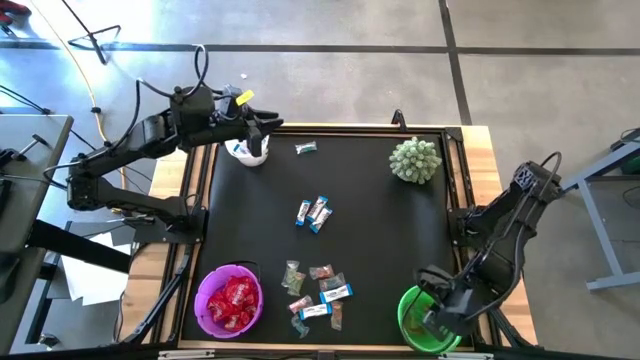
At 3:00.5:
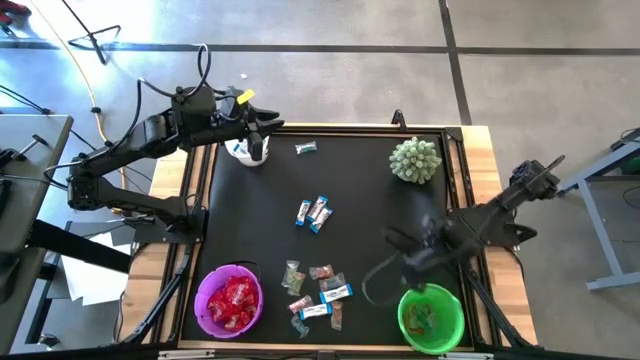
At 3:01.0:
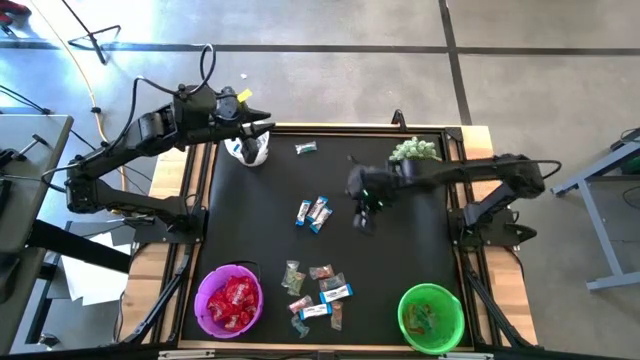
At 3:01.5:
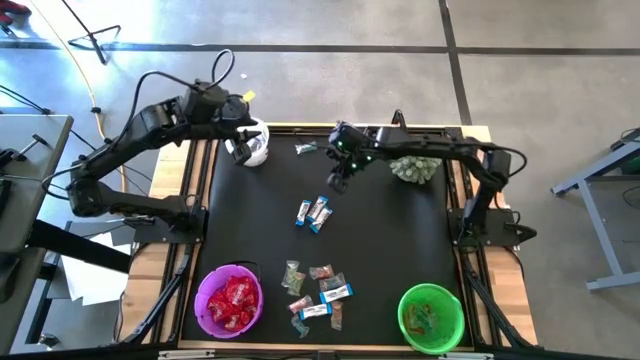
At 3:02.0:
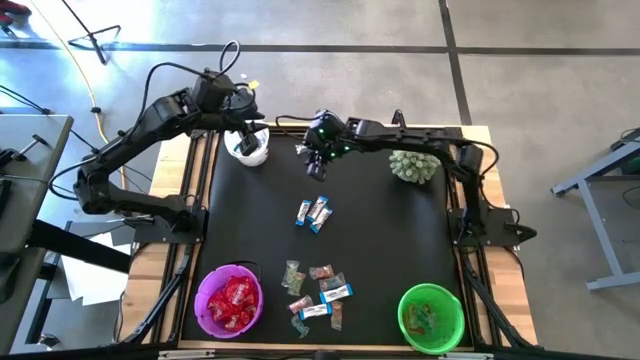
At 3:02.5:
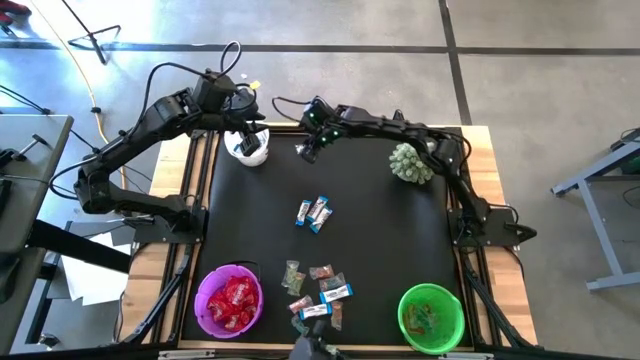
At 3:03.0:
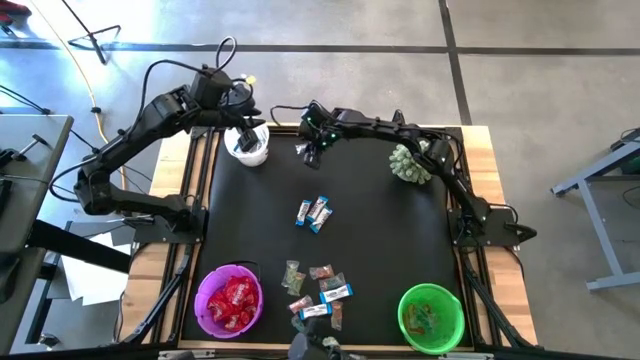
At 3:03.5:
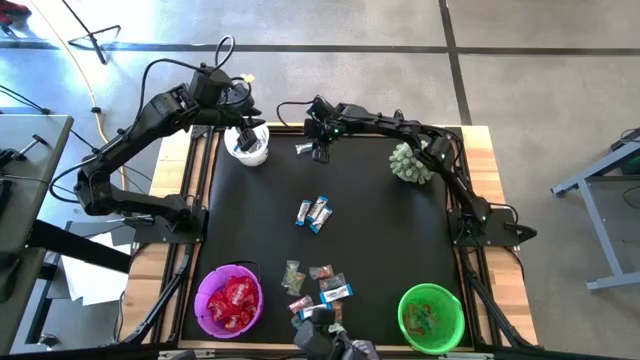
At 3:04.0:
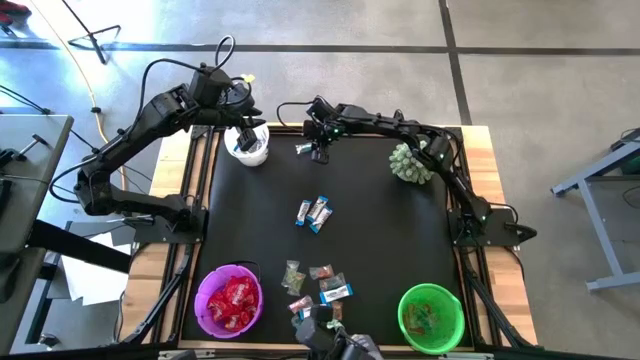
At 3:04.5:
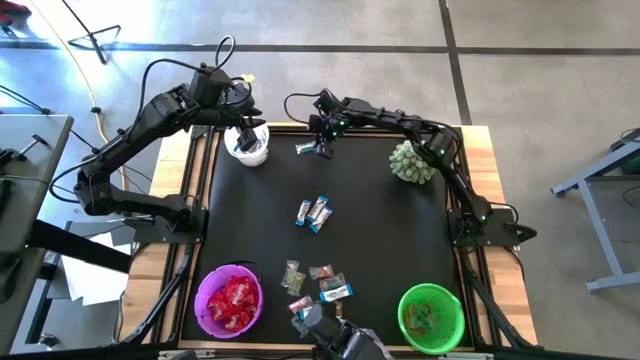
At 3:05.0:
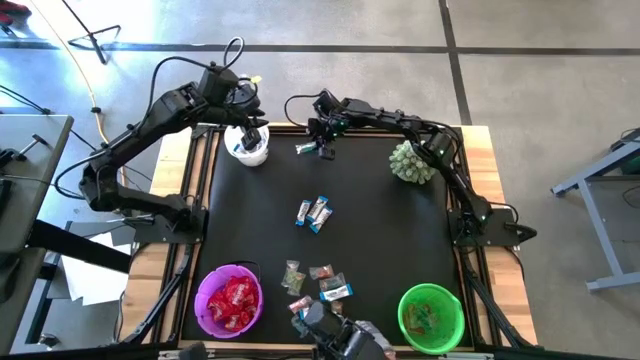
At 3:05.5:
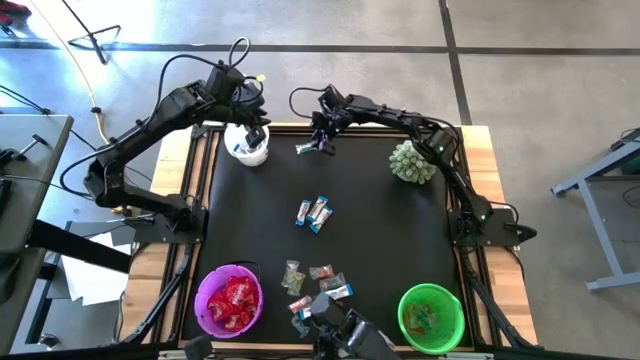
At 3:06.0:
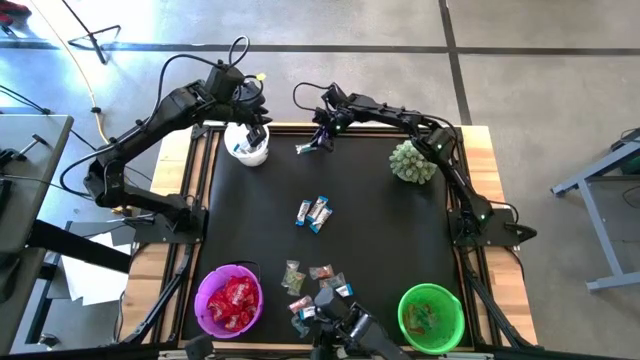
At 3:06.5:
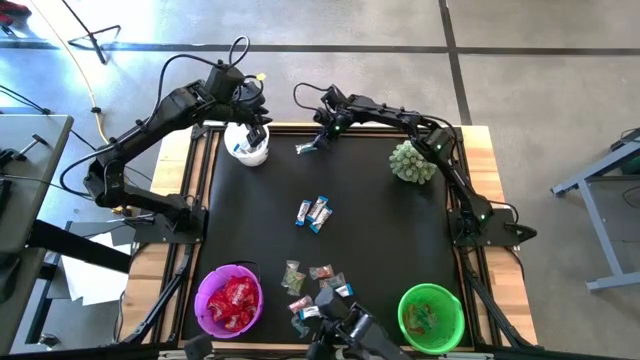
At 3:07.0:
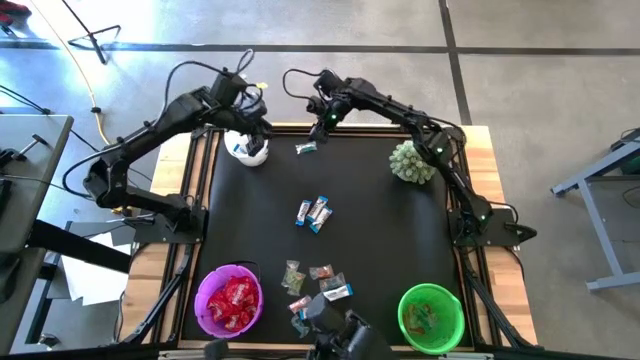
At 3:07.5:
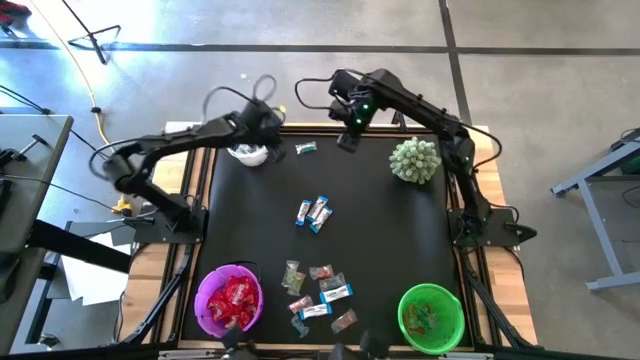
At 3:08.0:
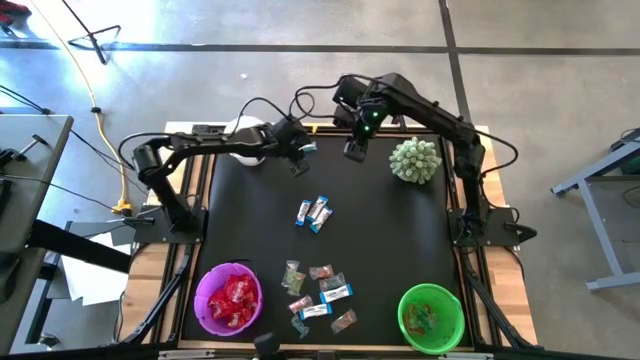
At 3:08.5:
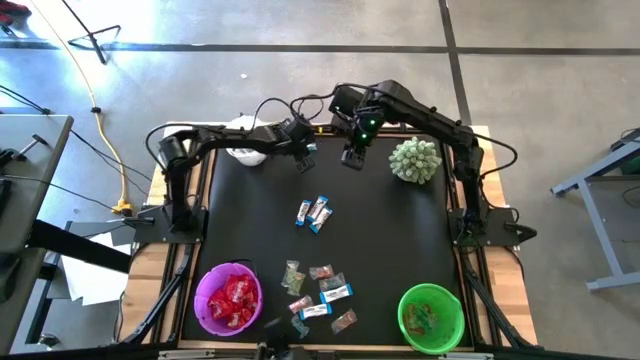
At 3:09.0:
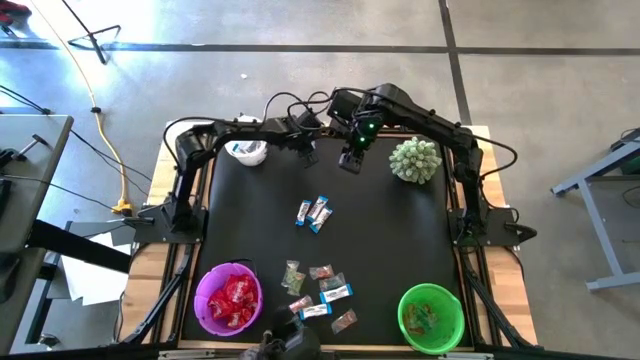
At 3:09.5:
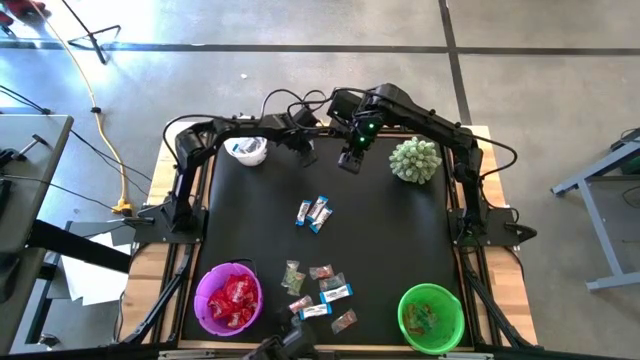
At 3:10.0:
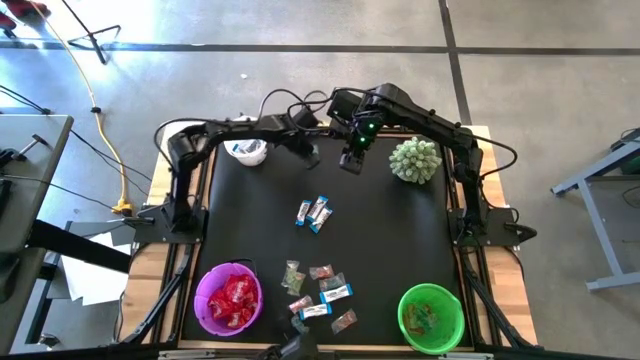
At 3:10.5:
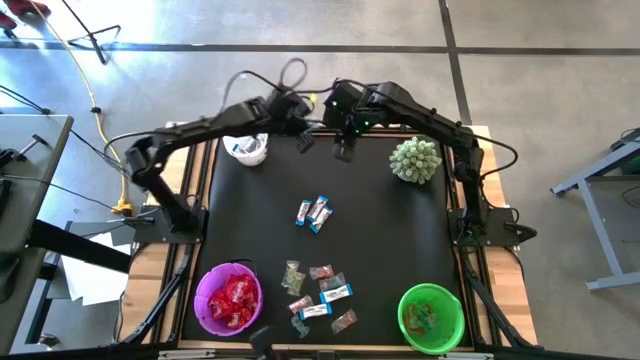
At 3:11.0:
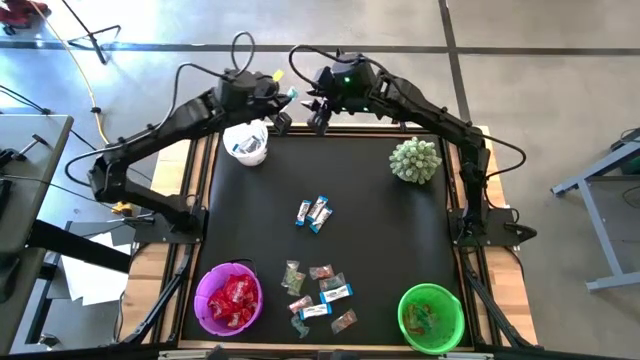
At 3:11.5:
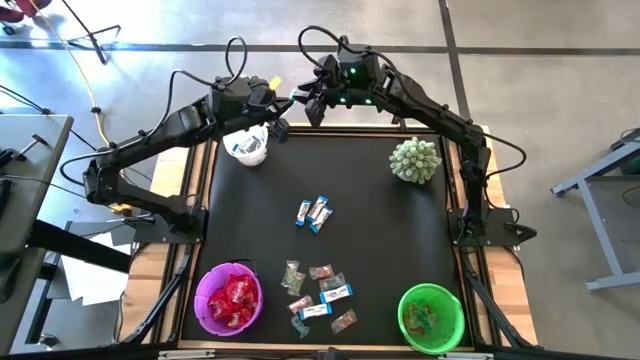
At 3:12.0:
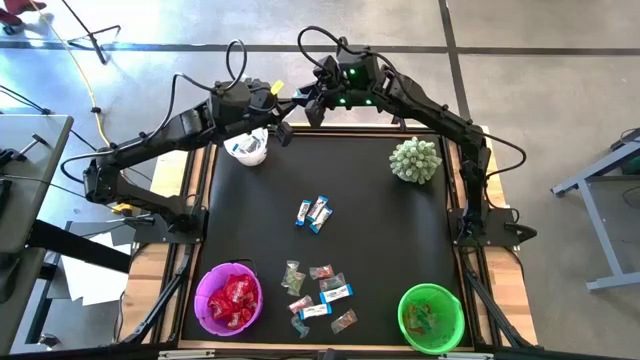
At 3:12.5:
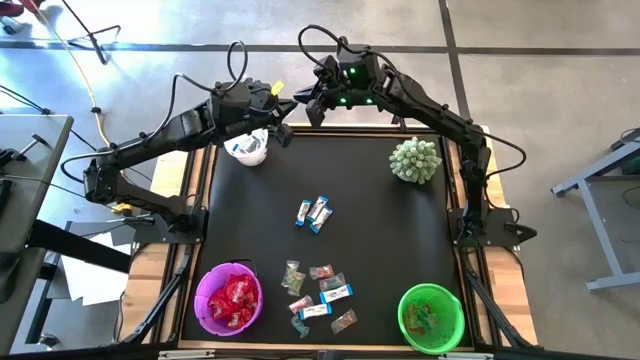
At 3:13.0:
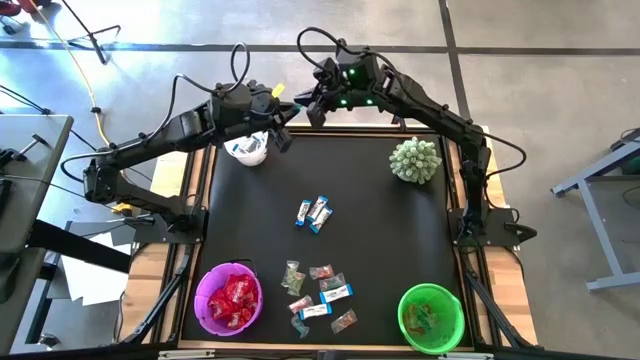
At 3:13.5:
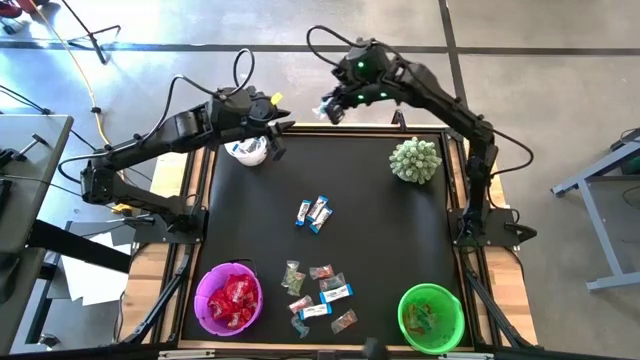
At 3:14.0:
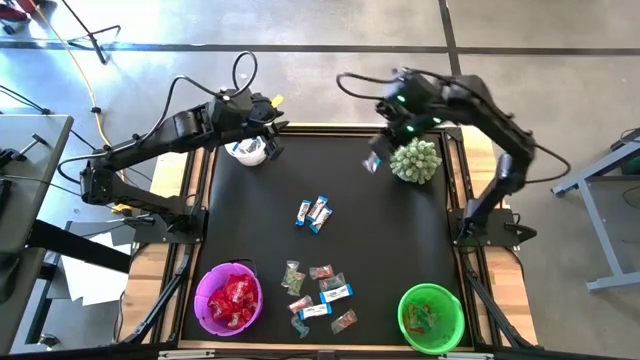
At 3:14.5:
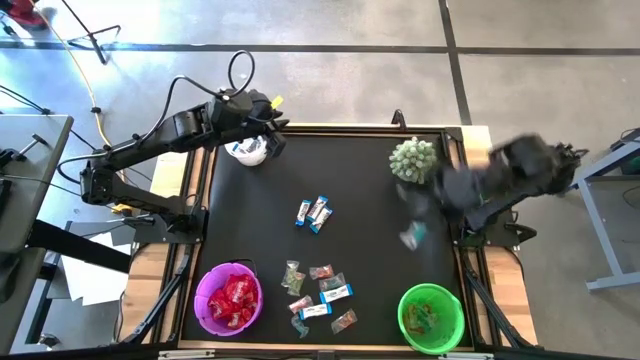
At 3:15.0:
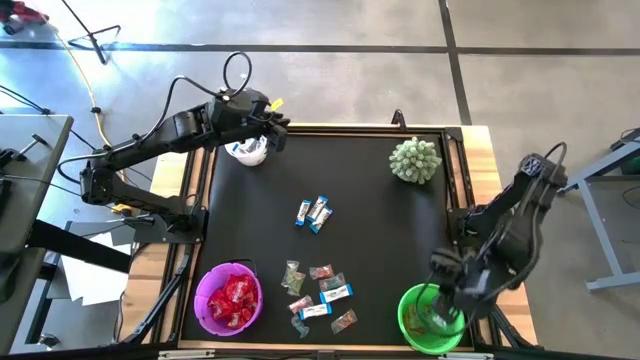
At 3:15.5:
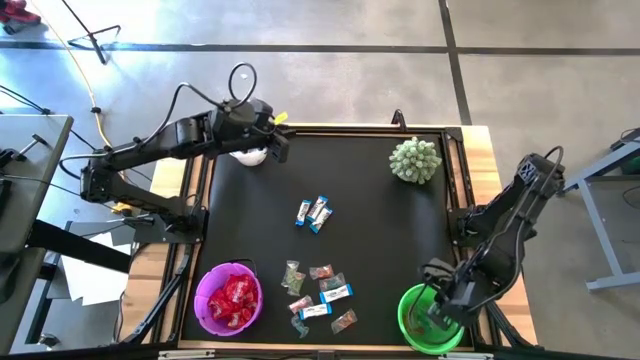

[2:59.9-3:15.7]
Task: Sort candy
Put the blue gummy into the green bucket

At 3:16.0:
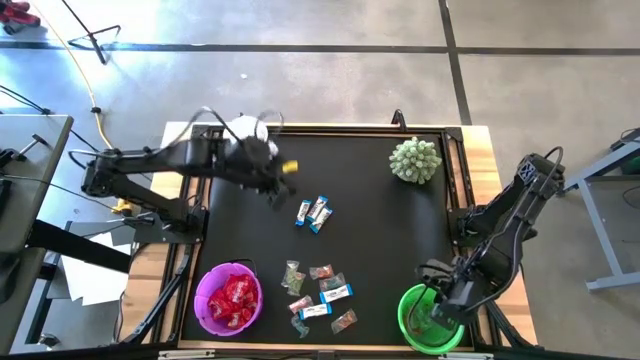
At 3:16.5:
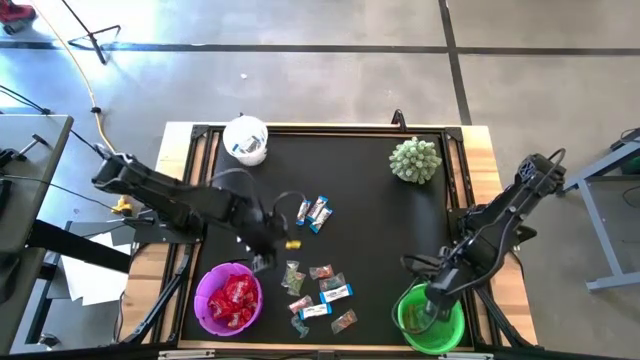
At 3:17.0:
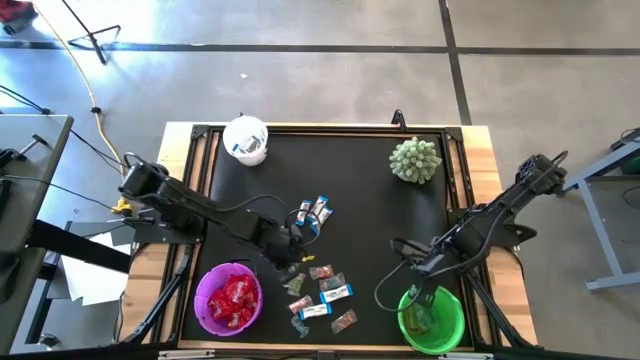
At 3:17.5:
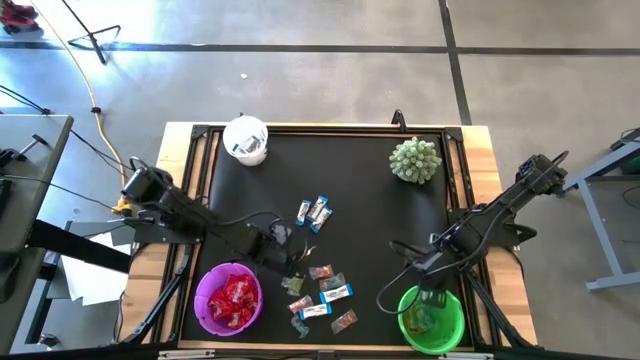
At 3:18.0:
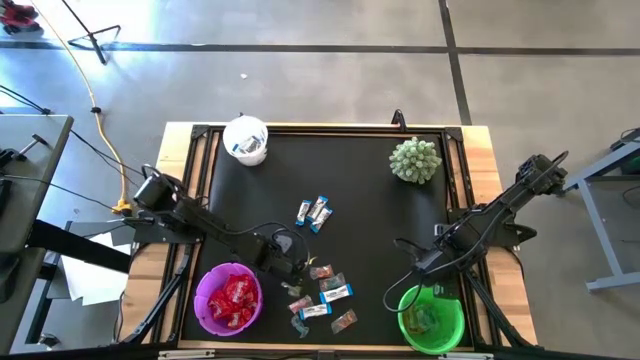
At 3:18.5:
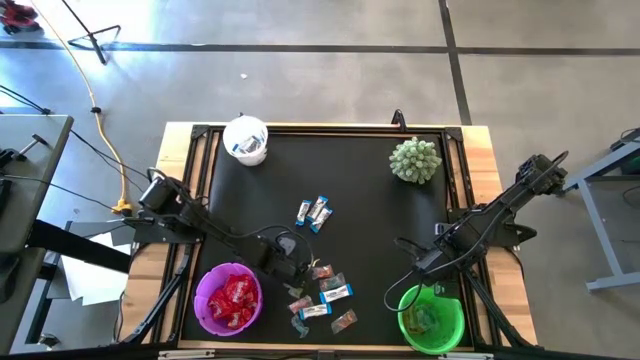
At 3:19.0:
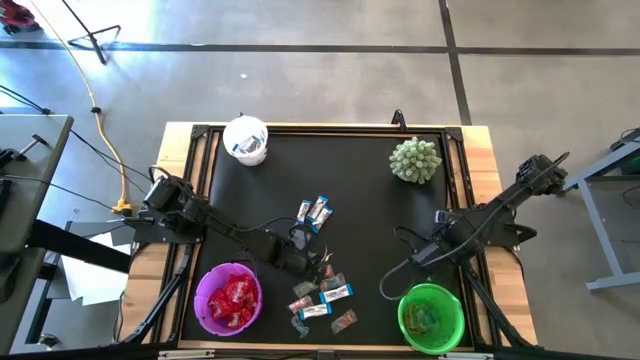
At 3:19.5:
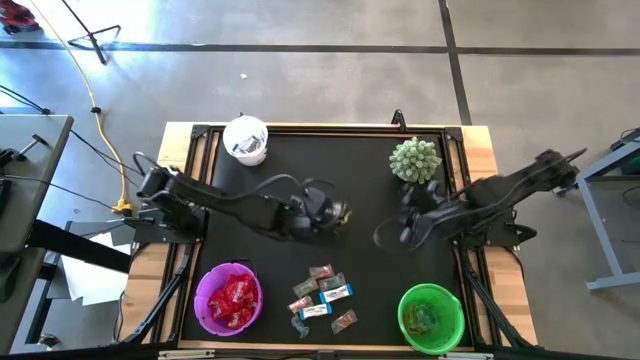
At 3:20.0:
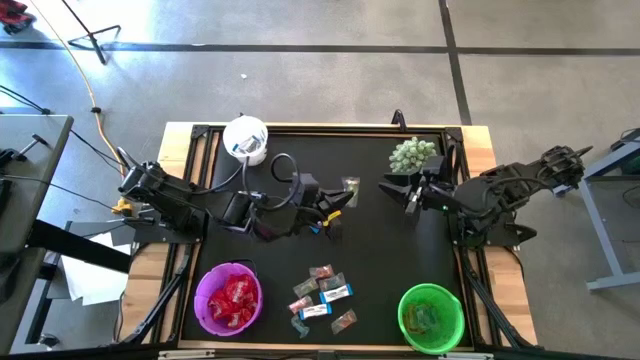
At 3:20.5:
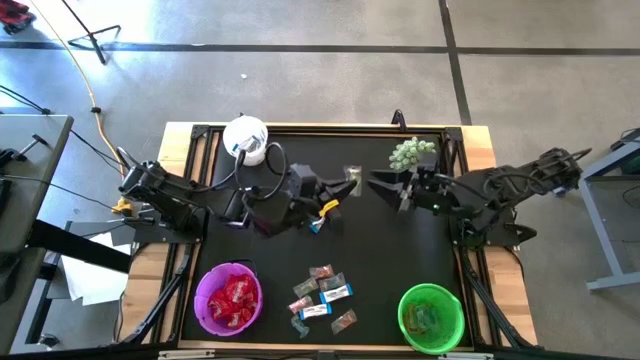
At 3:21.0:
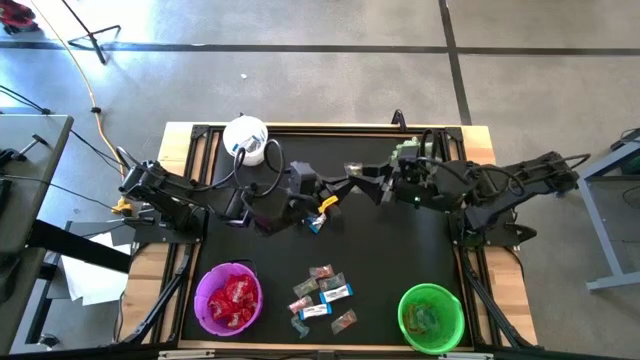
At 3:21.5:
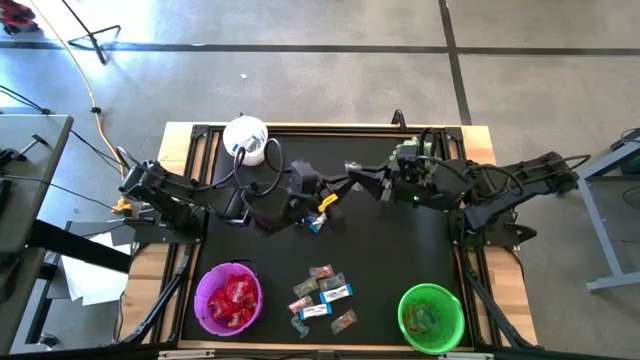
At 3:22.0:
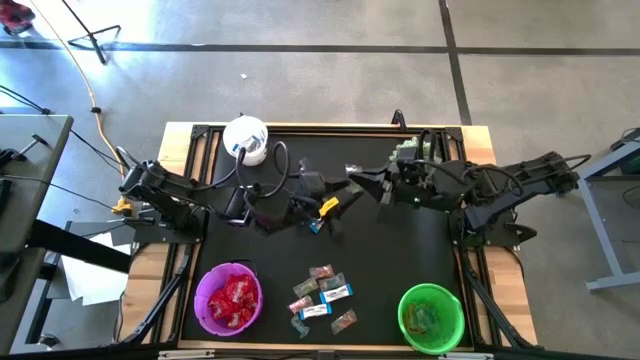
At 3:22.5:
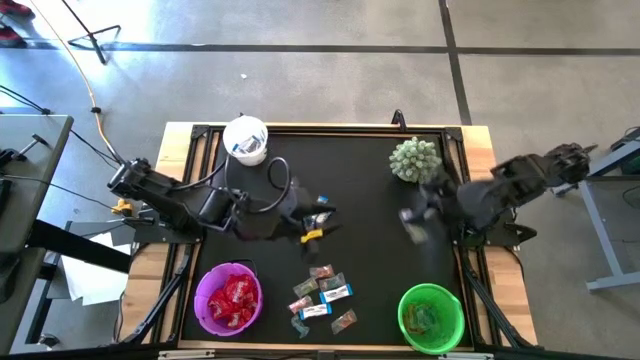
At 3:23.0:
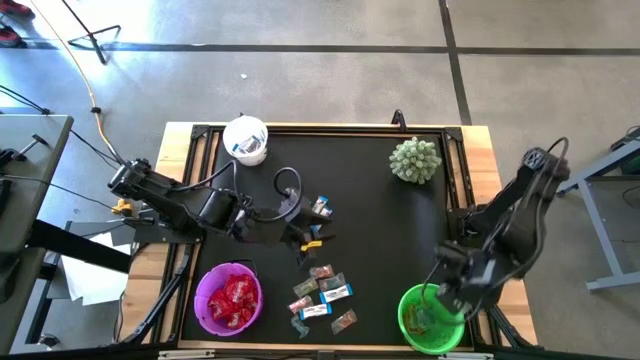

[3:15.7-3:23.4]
Put the green gummy into the green bucket
